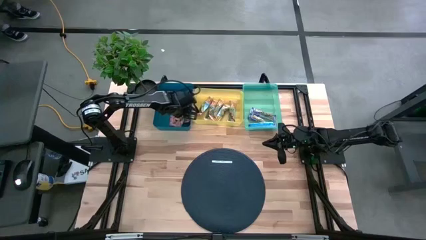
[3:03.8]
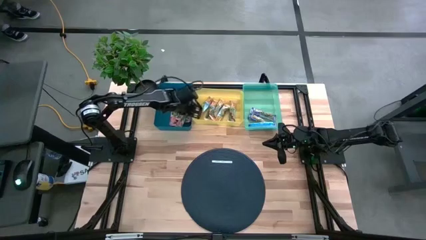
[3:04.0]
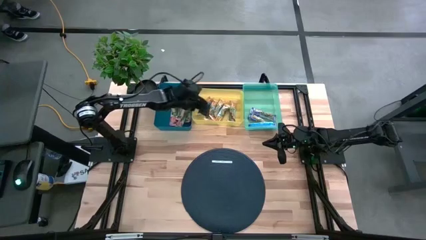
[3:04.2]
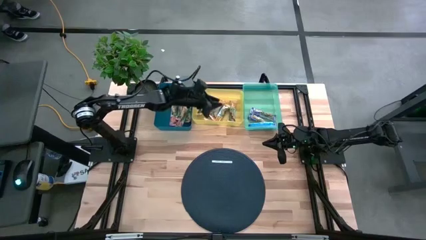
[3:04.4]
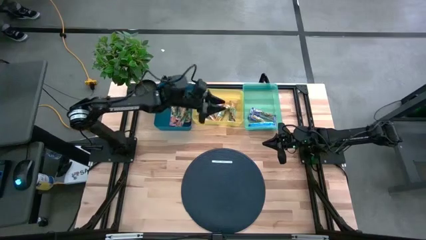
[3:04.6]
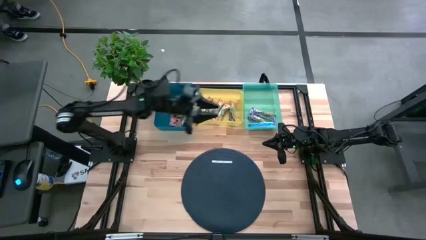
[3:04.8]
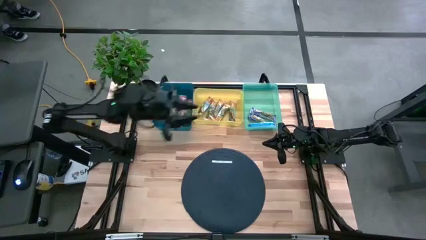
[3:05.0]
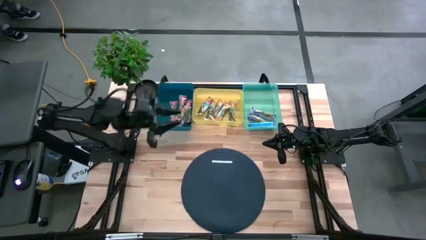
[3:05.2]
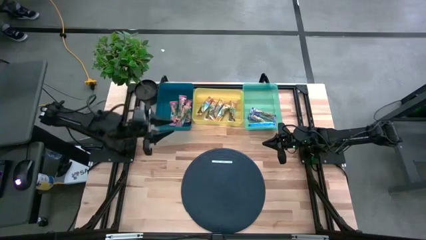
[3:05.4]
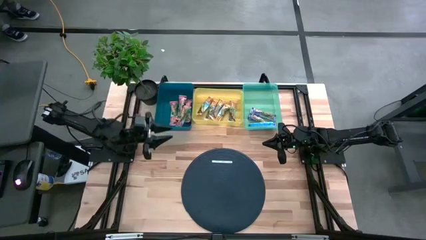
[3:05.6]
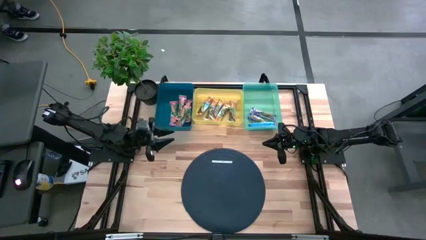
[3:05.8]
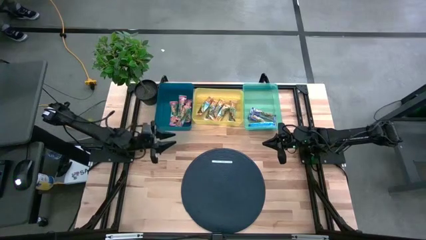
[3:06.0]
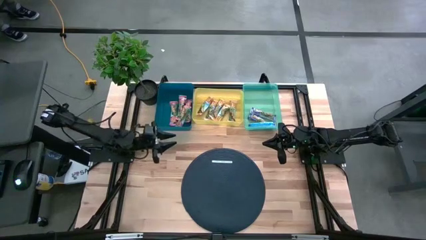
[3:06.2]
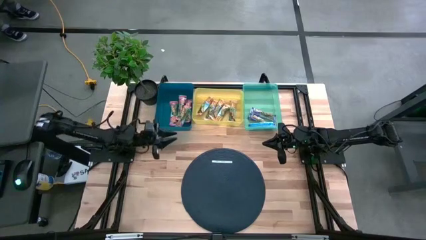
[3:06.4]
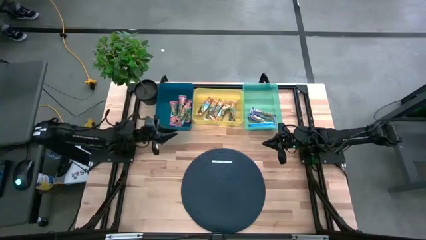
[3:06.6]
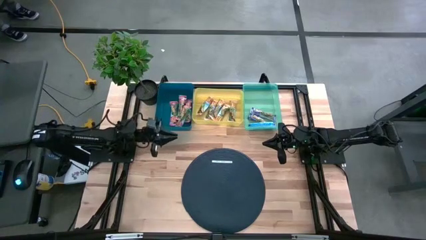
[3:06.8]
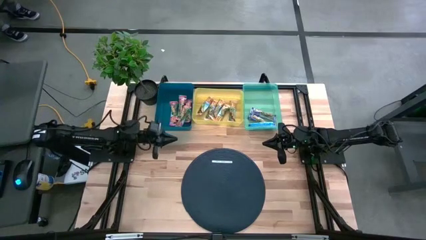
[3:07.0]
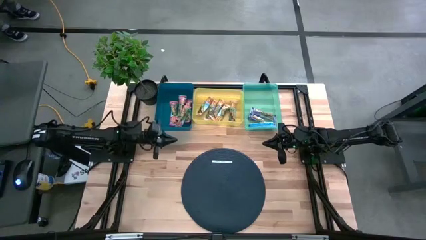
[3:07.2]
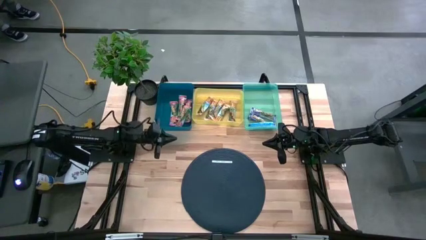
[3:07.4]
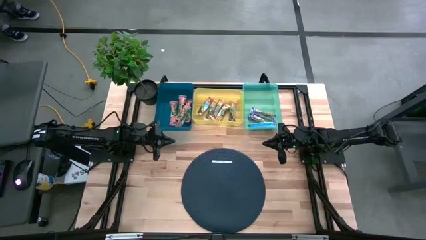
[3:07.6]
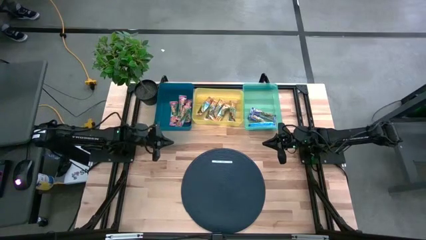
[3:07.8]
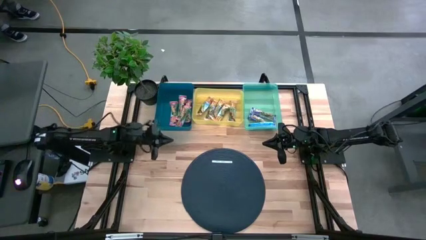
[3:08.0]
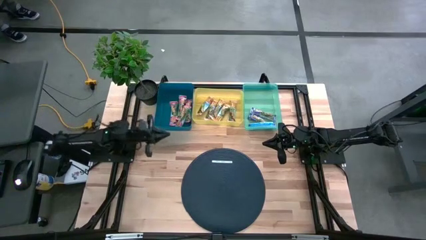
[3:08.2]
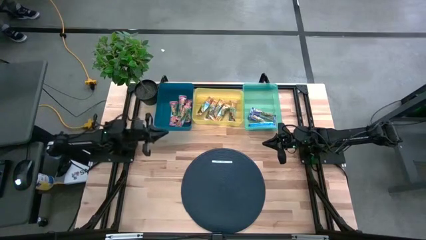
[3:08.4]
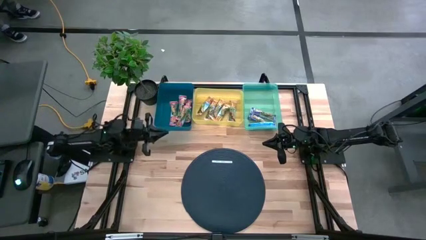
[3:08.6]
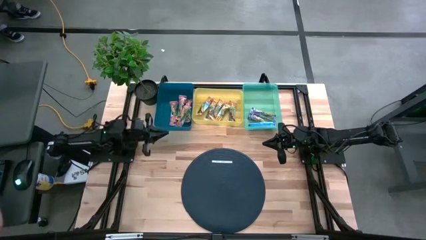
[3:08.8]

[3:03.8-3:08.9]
Task: Pick and place Granola Bars by type
Return to Home Position

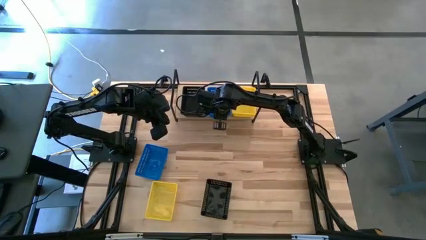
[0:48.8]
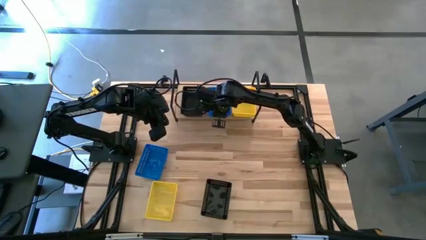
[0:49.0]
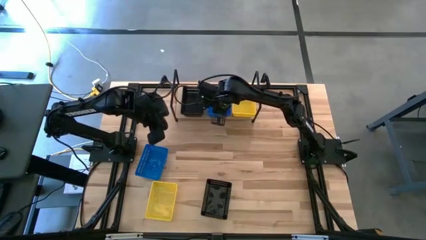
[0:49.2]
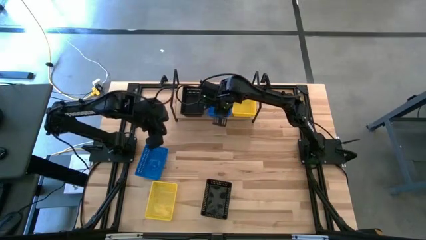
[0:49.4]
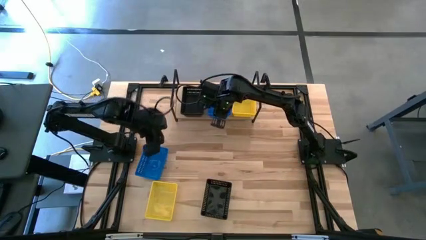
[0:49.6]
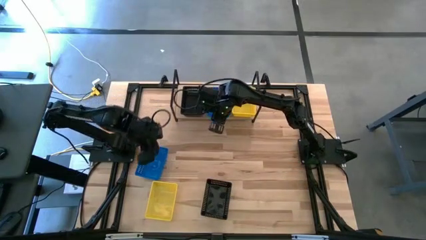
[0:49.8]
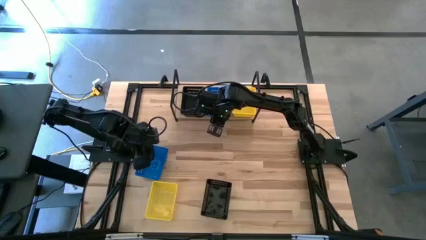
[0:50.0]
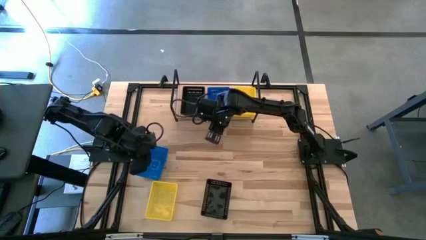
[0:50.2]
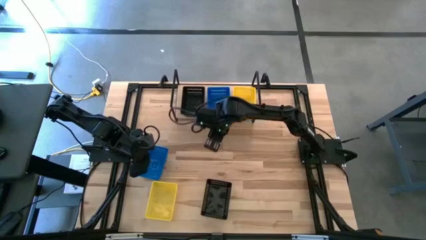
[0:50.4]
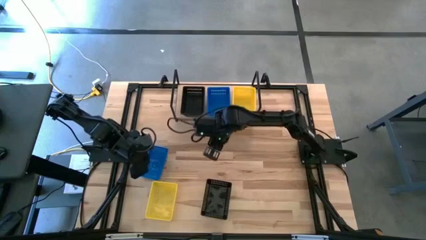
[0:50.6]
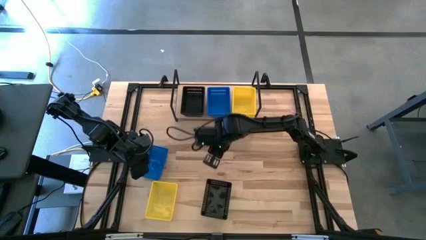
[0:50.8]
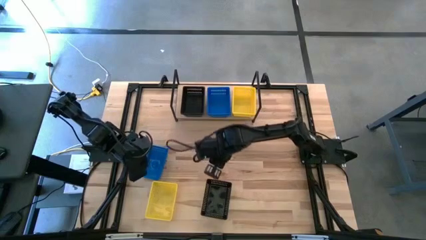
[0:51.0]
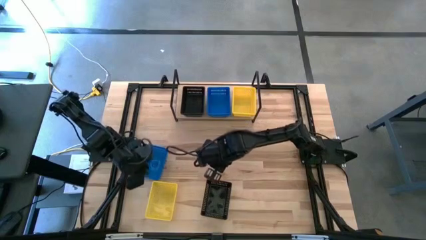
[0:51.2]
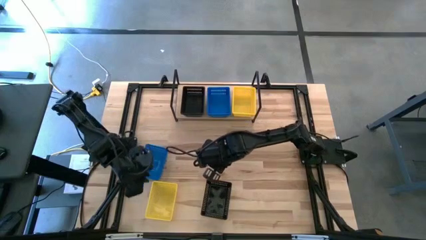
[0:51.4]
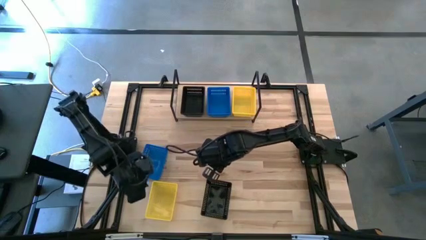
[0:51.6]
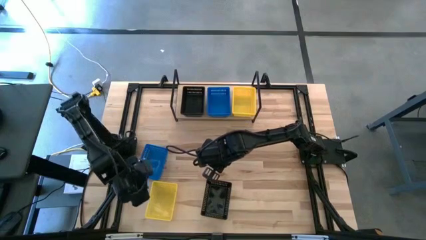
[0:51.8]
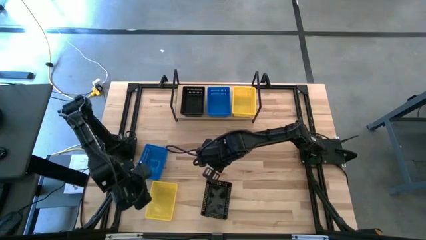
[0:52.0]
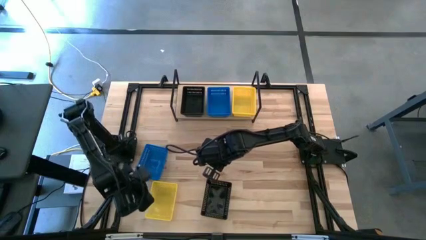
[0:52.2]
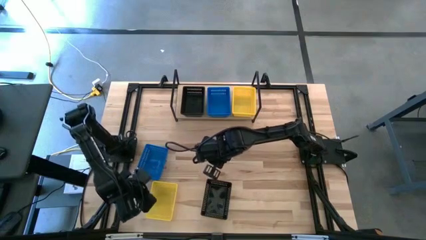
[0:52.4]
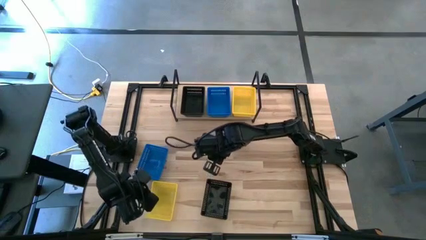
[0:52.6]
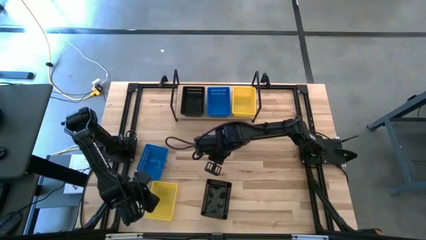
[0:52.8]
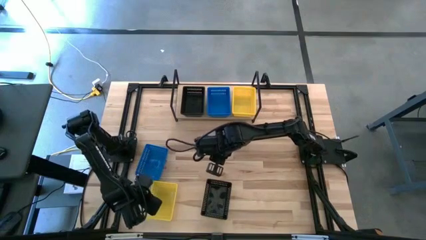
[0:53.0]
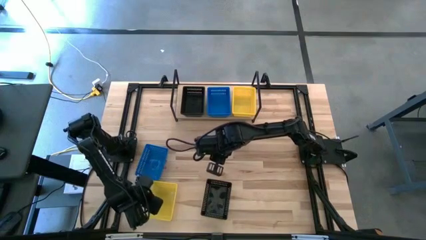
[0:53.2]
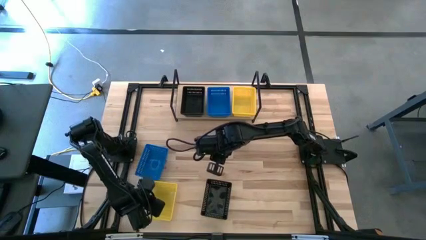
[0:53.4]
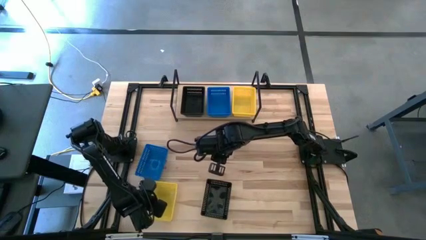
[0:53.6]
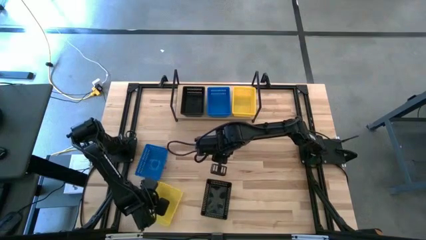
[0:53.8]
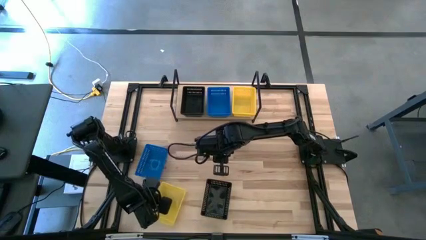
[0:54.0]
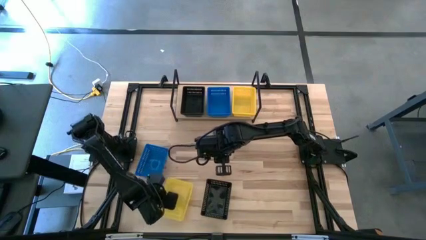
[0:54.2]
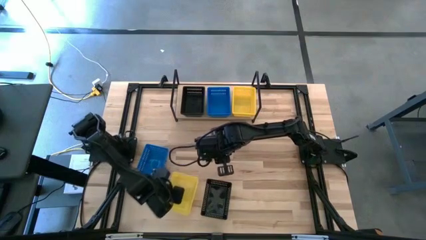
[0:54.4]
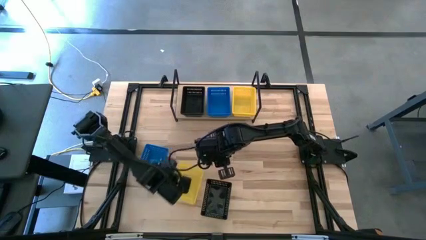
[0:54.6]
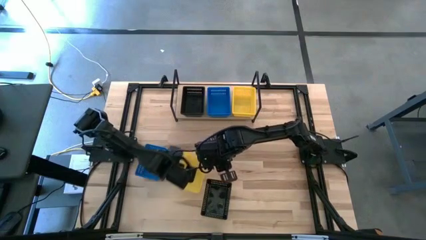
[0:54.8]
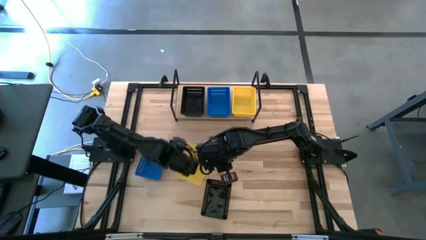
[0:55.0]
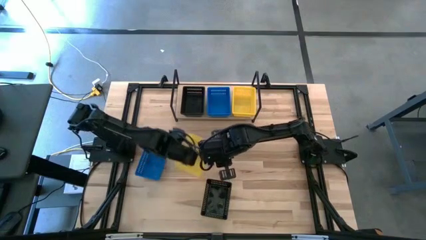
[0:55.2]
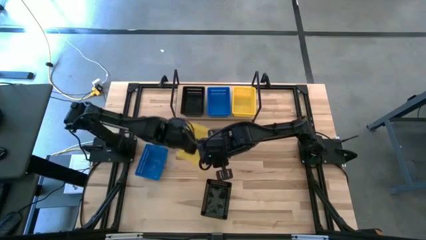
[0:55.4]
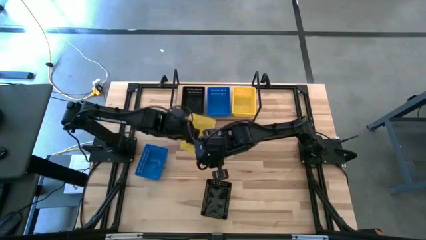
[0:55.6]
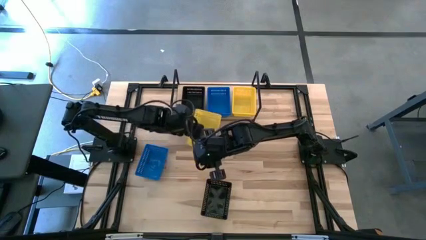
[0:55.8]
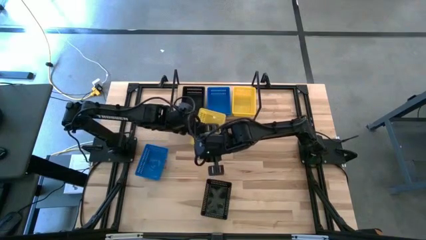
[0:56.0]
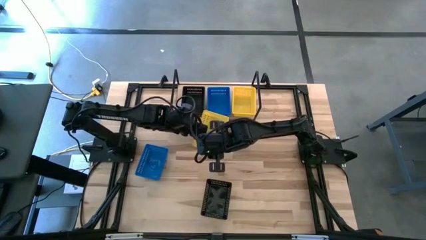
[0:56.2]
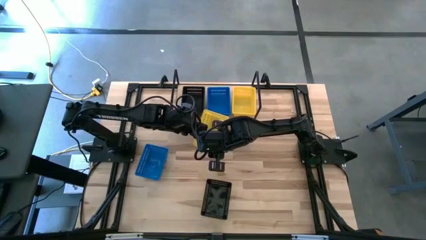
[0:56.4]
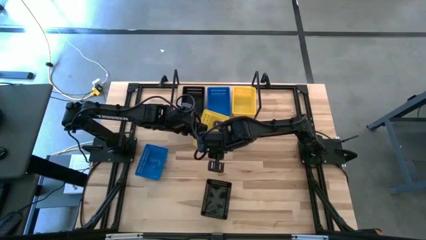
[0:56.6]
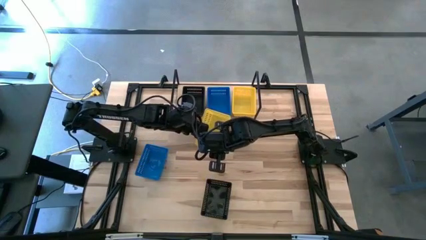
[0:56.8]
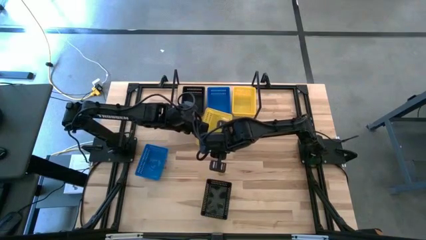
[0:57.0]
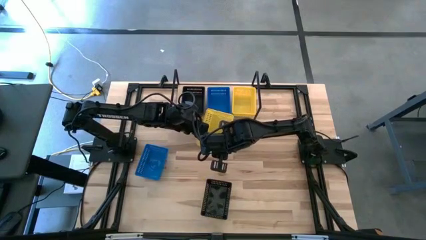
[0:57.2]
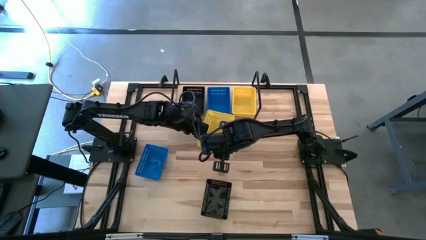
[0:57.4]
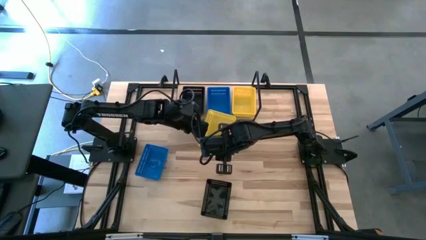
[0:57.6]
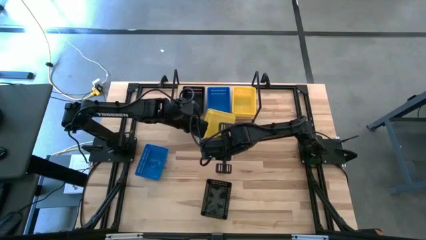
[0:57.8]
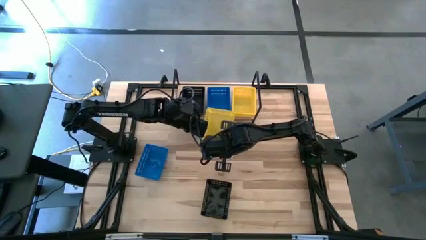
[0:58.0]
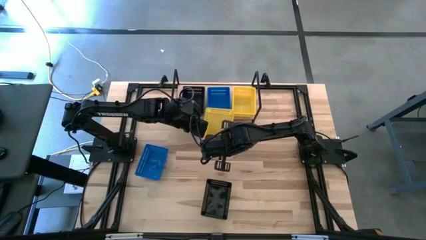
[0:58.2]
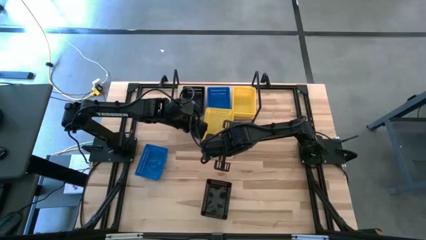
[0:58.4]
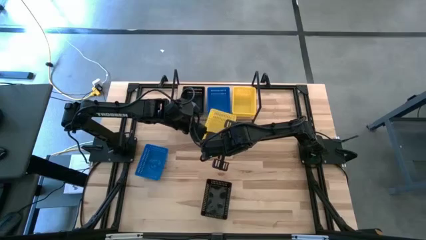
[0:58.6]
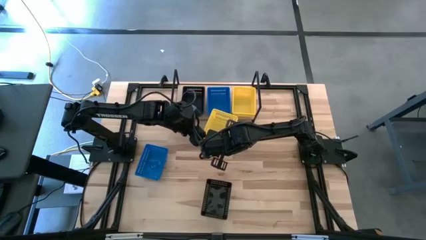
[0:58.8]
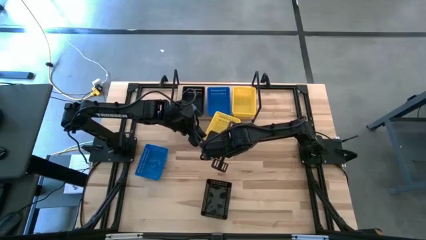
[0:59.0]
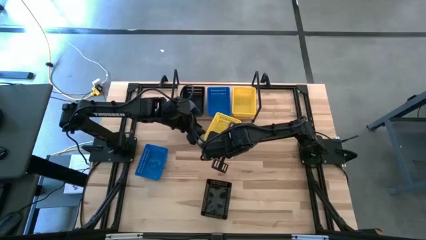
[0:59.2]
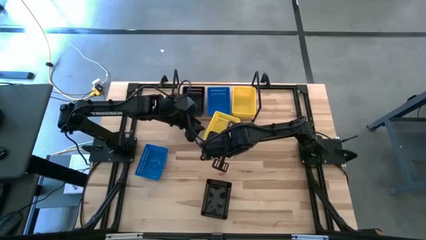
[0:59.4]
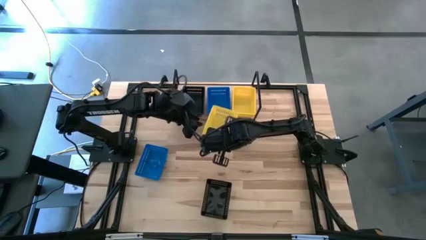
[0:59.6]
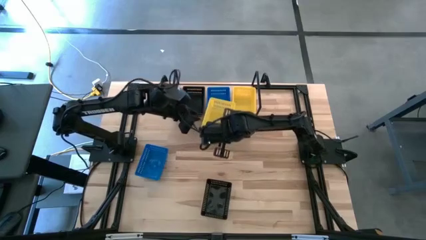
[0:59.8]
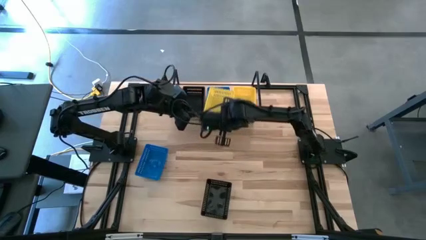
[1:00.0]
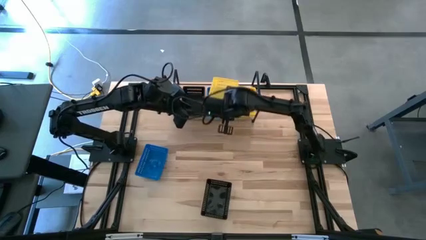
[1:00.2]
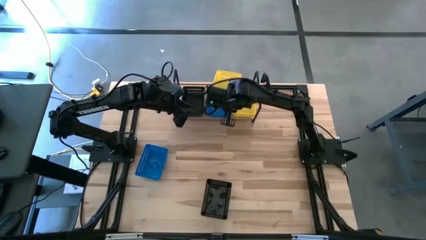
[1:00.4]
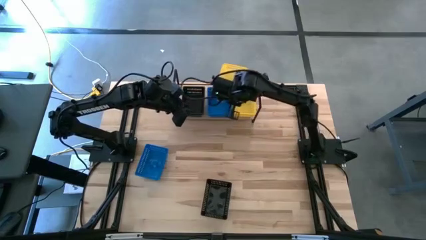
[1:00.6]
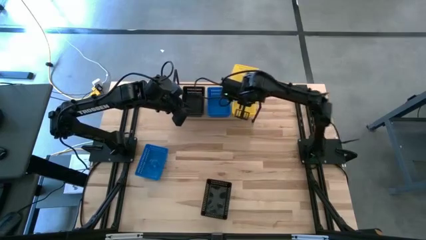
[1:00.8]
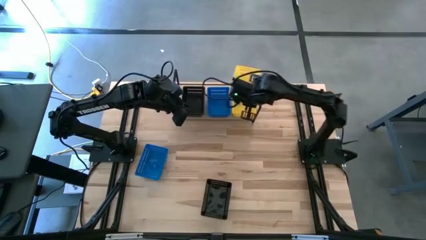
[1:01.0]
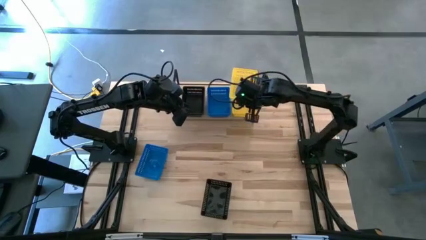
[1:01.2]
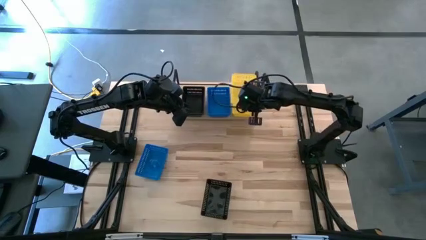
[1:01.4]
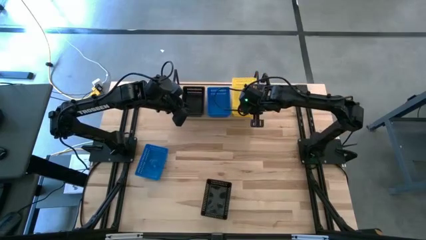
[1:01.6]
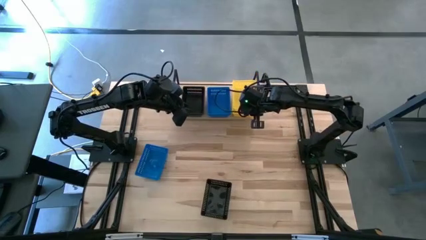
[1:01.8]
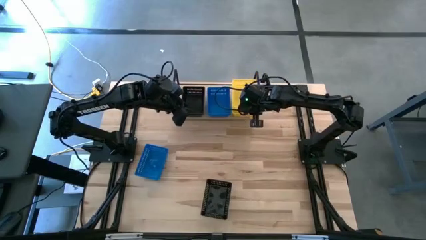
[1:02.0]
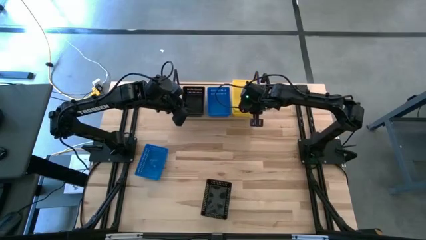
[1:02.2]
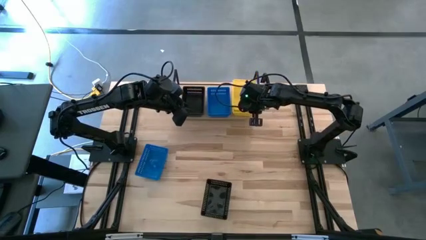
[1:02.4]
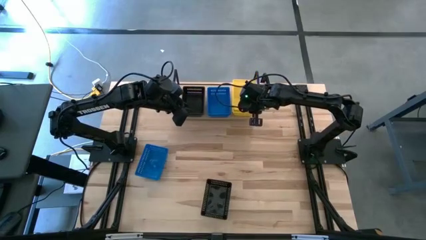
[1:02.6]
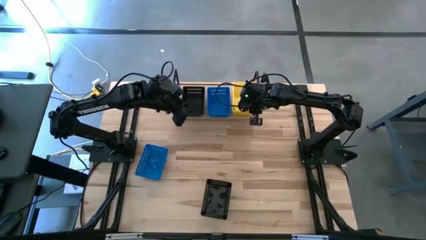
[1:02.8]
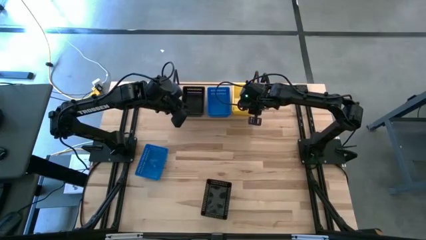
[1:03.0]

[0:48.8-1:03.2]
Task: Stack baskets on shelf by color
Stack the yellow bin on top of the yellow bin on the shelf
